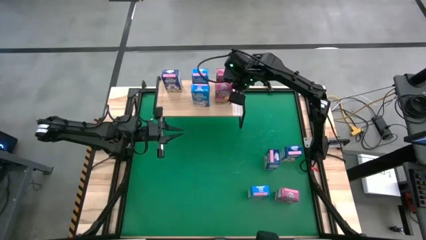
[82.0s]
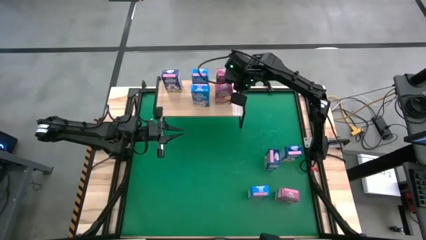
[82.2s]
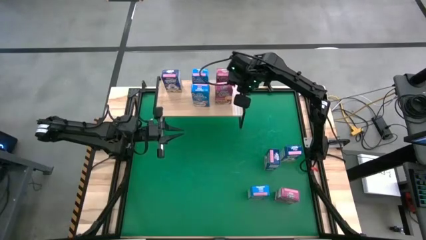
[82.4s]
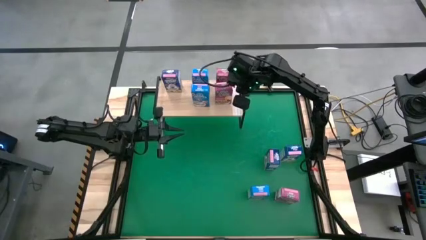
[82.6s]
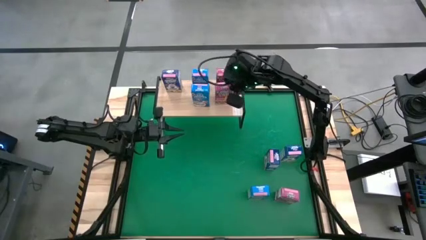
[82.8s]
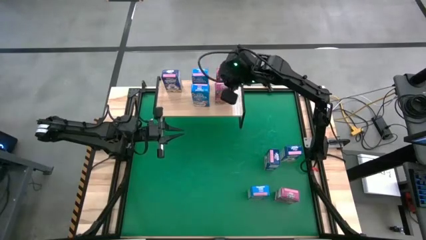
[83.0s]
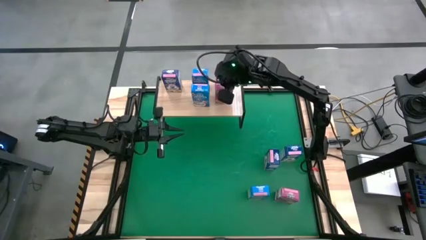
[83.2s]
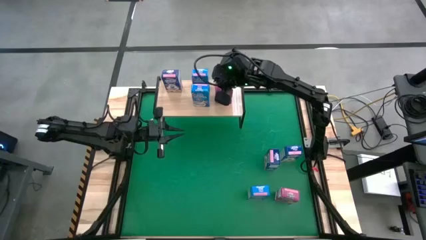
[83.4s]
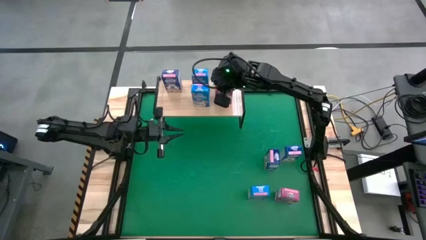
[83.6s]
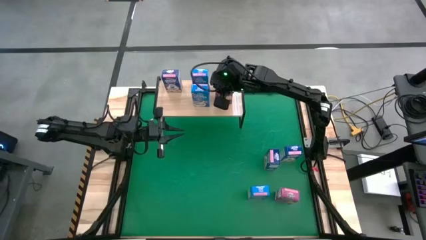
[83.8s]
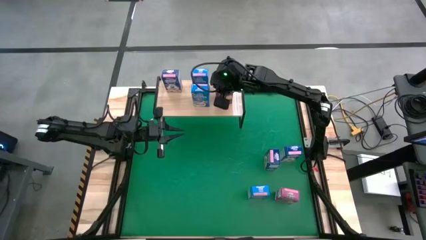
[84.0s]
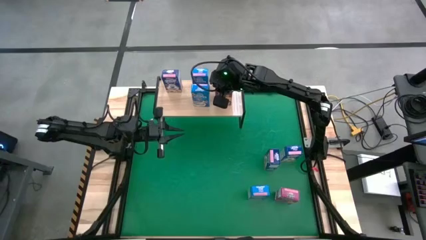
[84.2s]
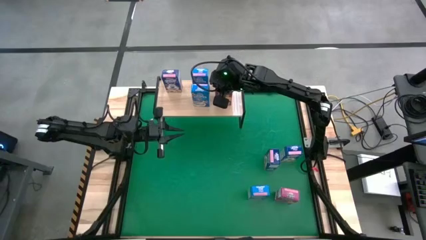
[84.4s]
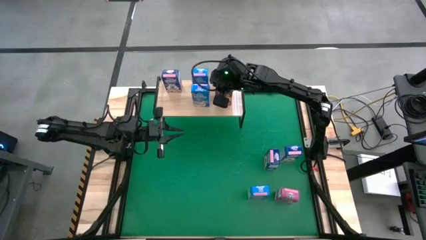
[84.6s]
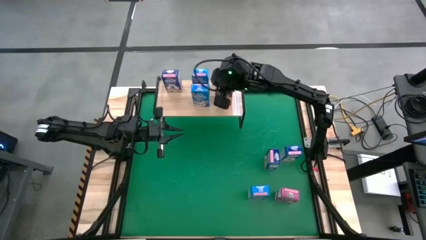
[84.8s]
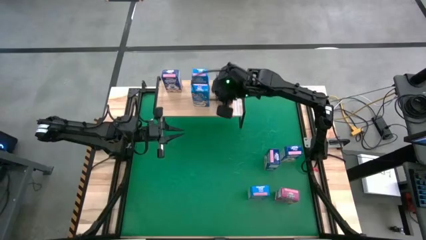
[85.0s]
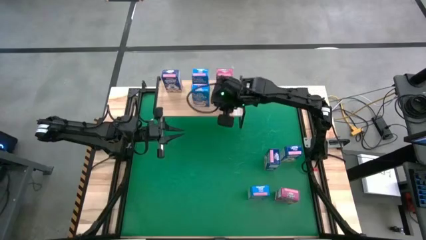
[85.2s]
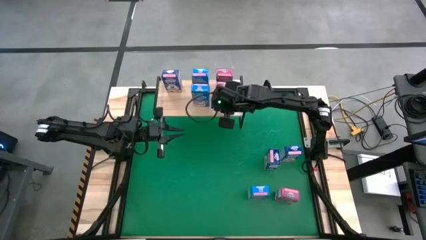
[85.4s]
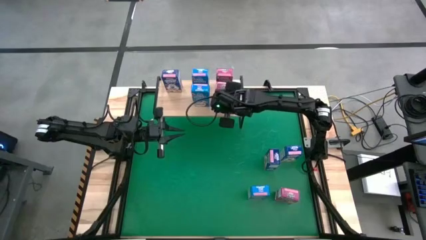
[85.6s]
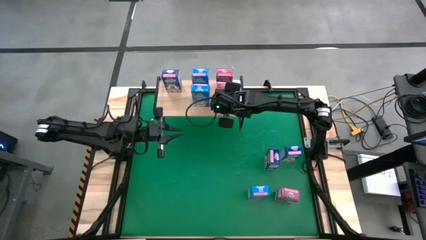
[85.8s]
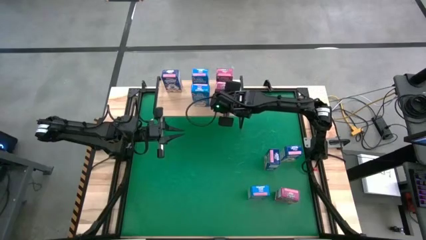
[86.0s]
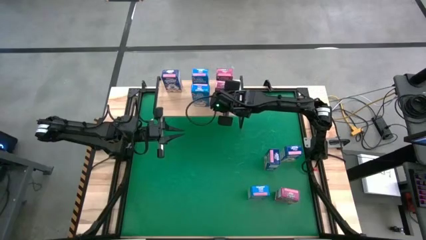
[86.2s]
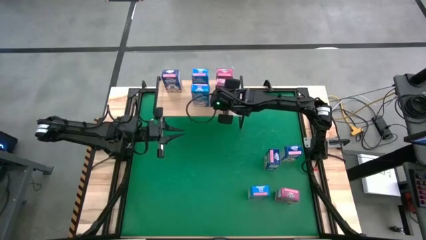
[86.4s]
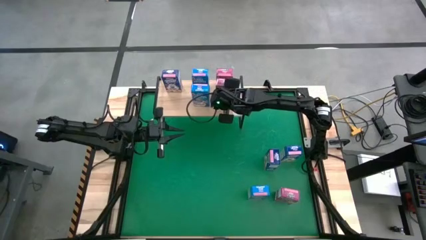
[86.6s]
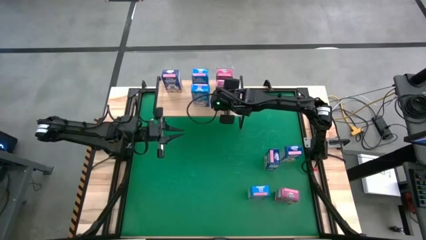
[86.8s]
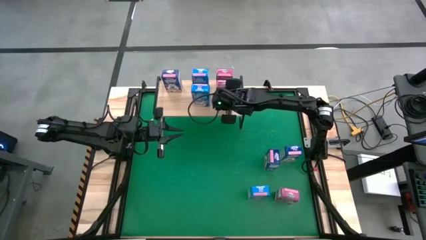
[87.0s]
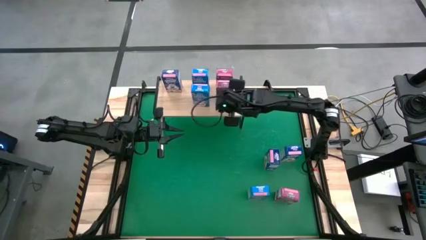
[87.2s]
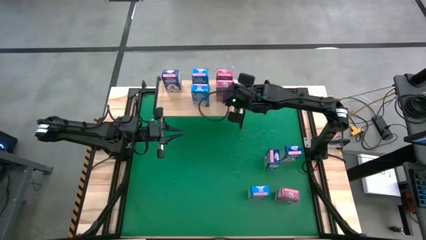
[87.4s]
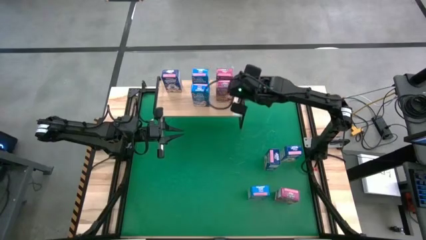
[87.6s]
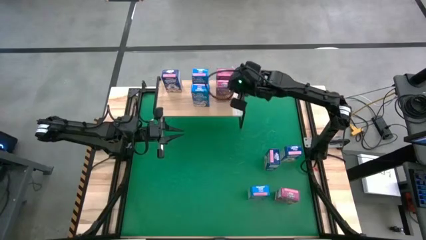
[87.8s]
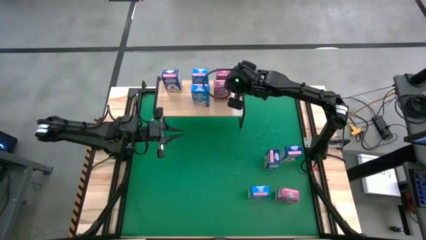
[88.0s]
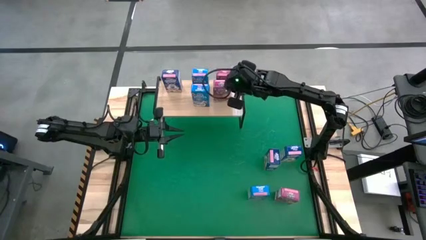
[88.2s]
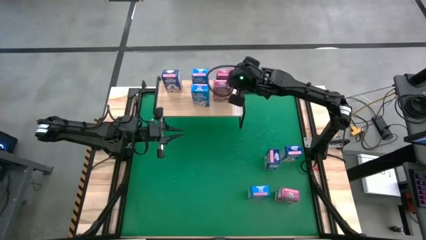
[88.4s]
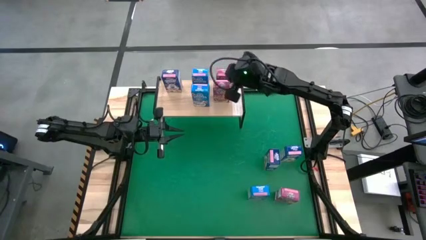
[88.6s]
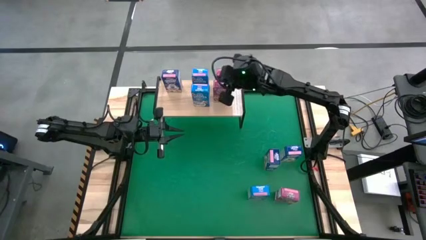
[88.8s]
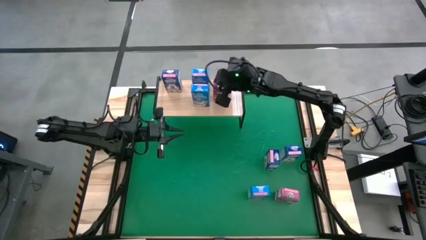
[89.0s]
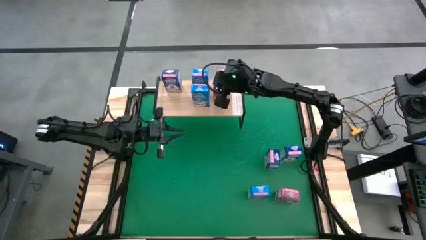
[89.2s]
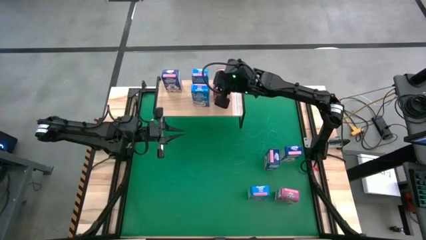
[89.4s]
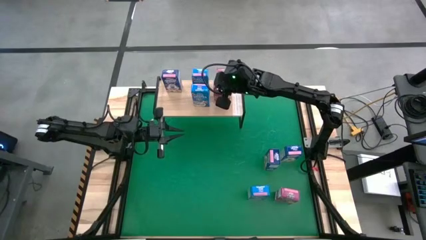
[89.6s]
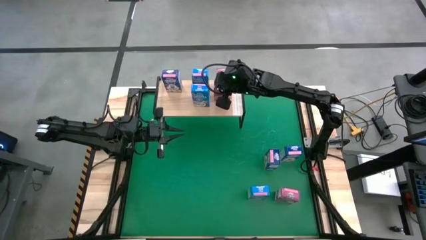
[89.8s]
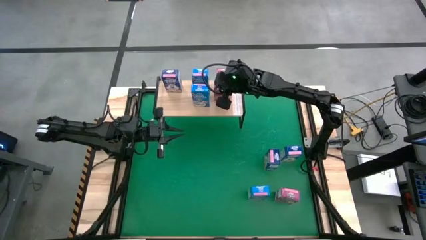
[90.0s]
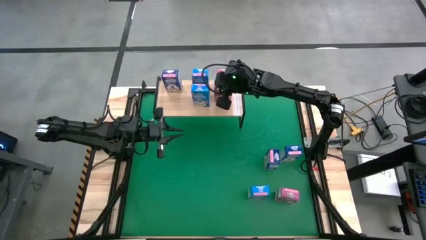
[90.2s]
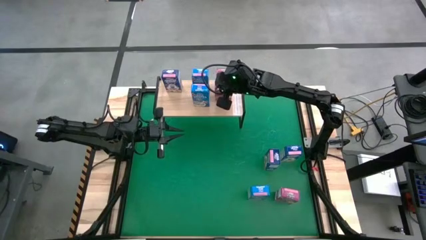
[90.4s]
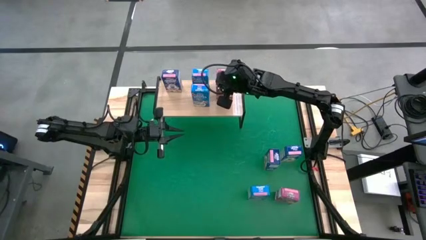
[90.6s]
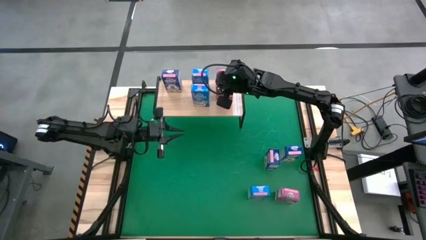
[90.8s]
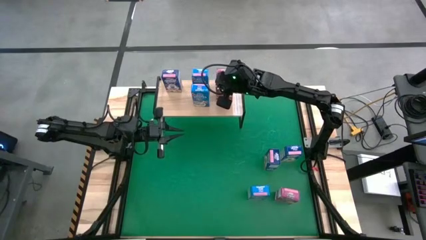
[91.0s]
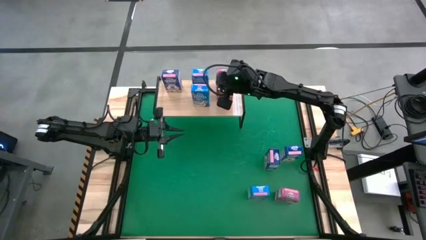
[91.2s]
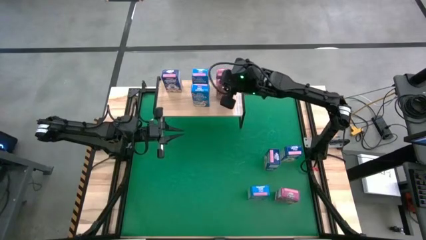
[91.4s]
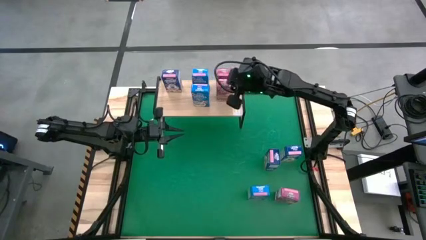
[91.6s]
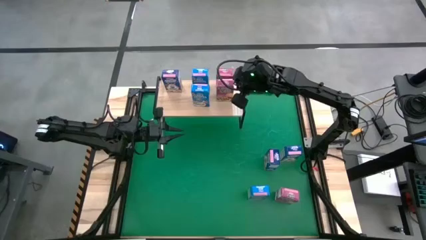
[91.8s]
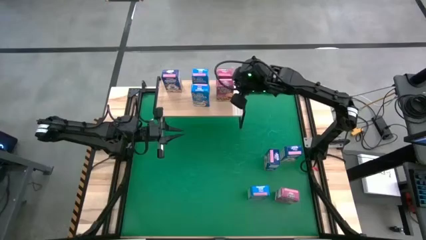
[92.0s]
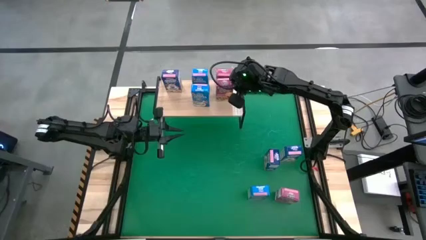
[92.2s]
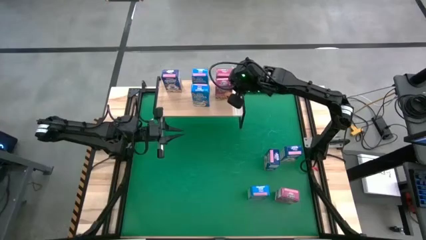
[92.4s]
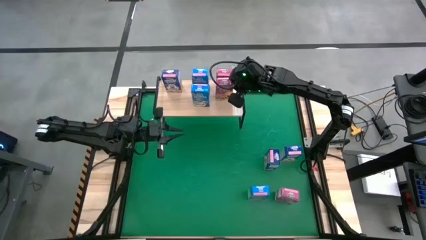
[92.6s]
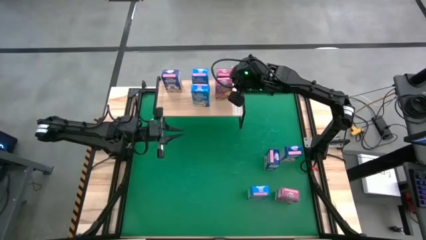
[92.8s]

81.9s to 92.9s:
Task: Stack cereal on shelf
Put the left pink cereal box on the shelf aligned with the other pink cereal box

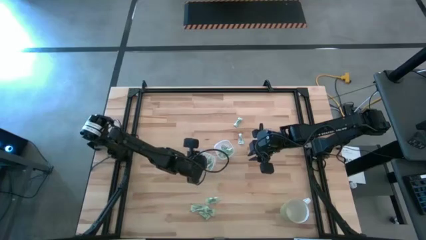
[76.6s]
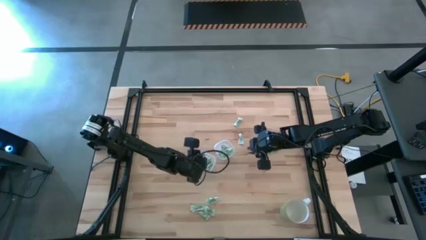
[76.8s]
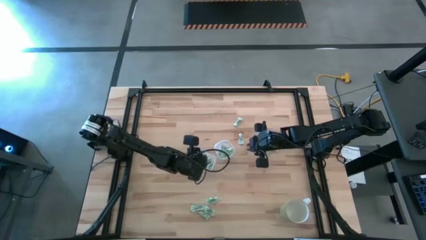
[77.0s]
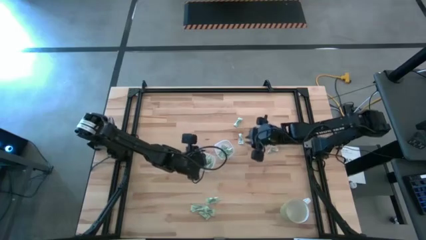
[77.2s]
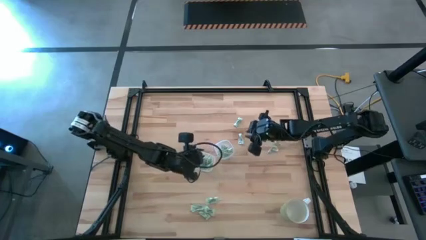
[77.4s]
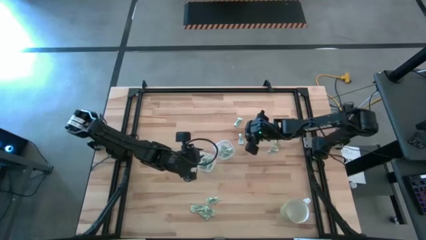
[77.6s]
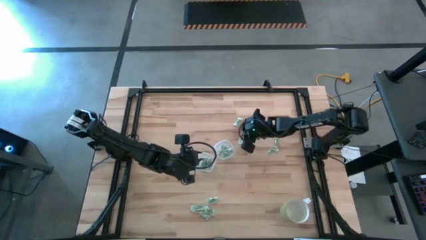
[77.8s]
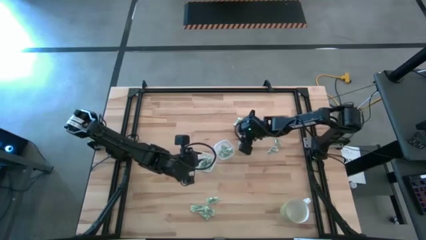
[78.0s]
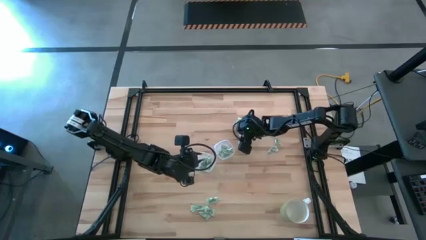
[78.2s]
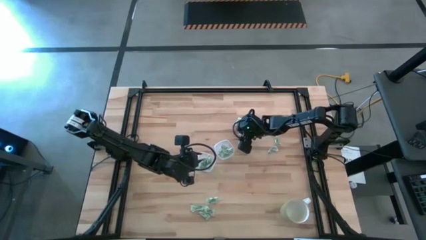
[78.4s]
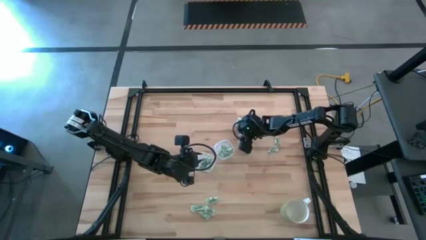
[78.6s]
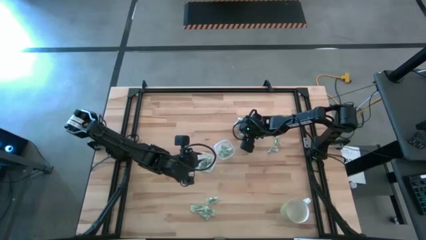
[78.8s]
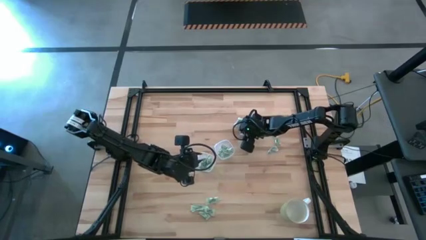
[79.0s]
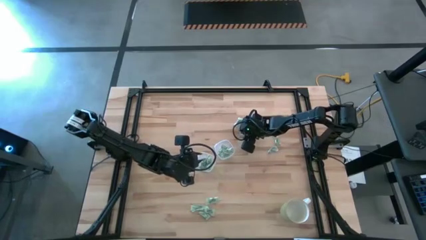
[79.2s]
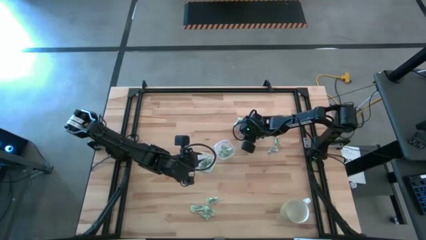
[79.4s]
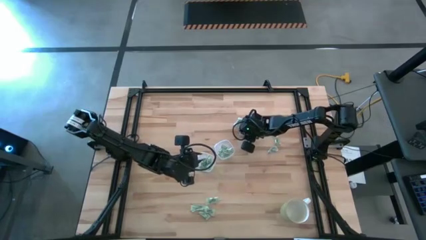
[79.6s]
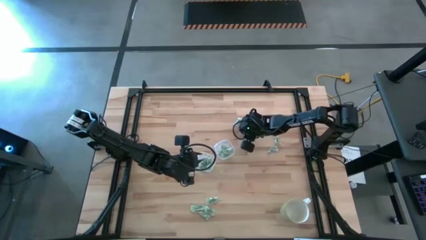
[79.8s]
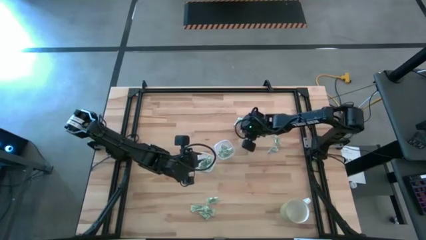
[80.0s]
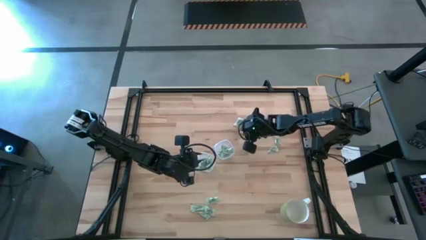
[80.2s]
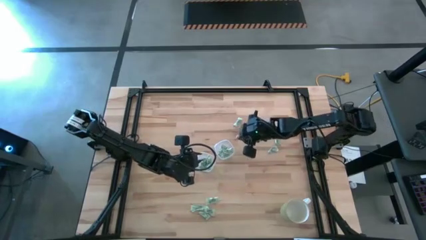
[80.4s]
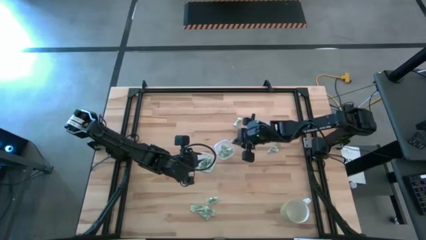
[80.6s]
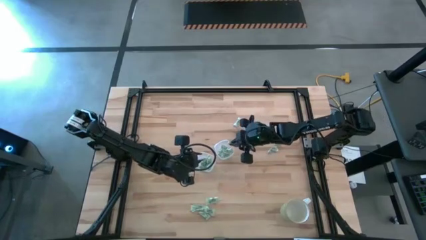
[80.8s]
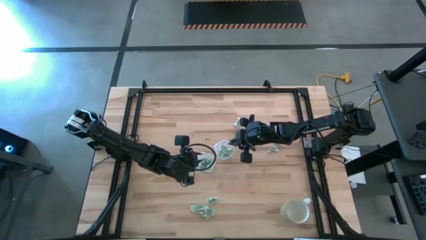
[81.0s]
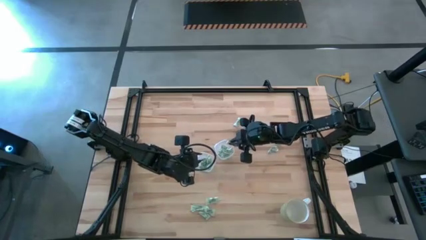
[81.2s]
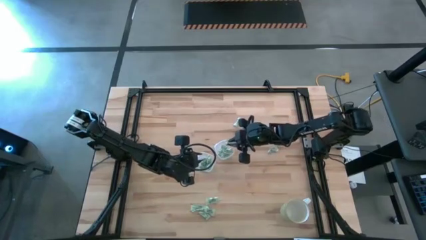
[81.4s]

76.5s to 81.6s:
Task: Pick and place items into bin
Put the stevia packet into the right bin

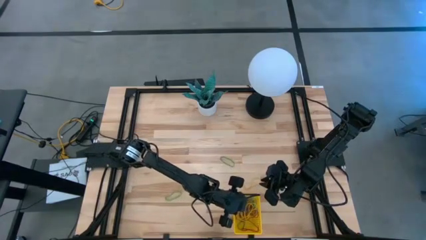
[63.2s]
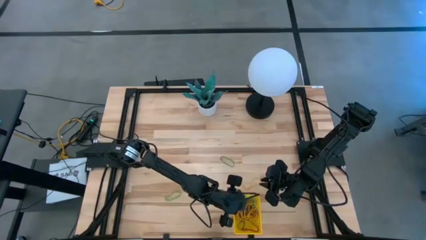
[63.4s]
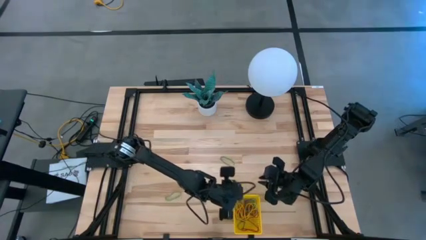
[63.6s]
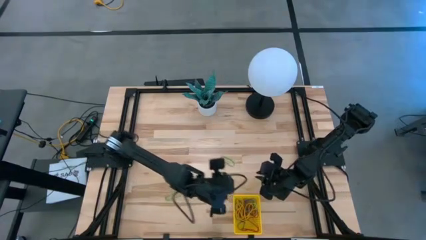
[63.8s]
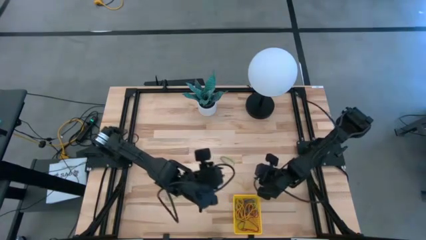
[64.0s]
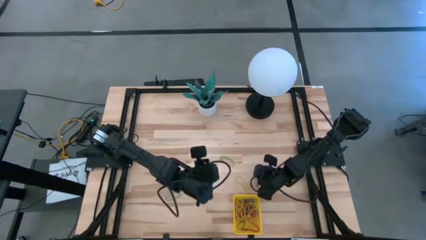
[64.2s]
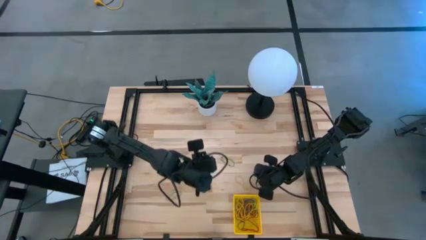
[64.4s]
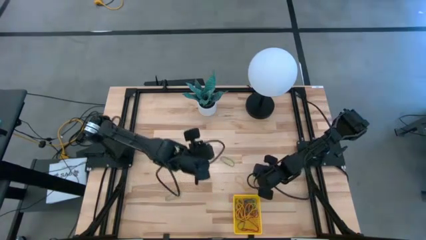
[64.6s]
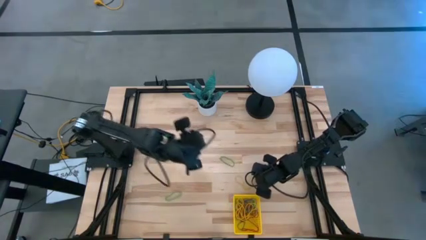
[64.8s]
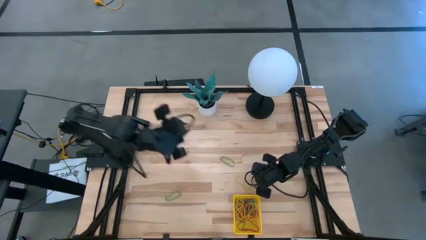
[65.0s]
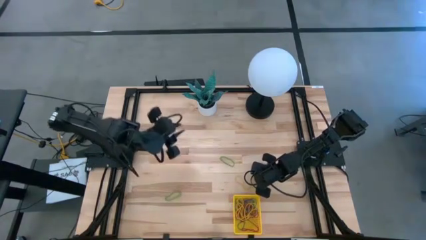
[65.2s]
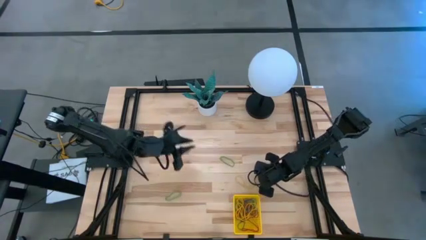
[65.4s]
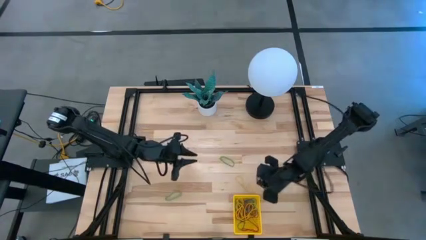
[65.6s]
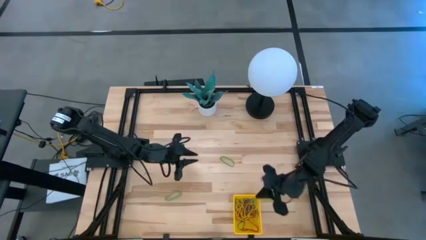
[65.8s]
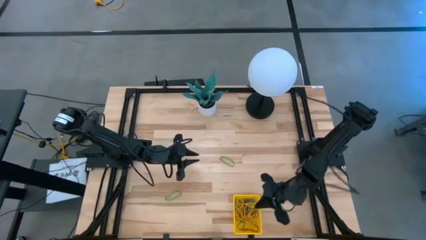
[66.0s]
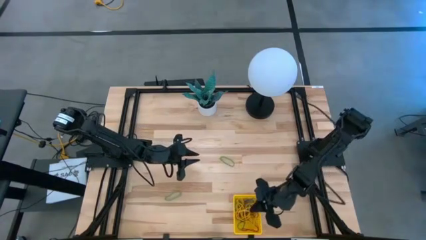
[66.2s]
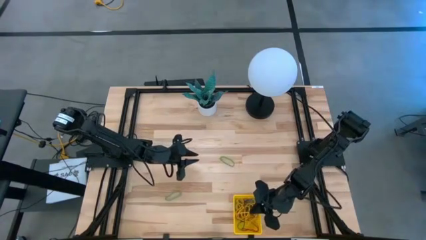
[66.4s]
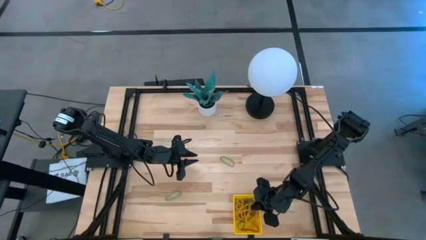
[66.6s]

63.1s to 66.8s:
Task: Pick and place rubber bands into bin
Put the yellow rubber band into the yellow basket
